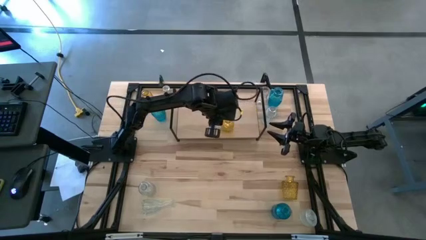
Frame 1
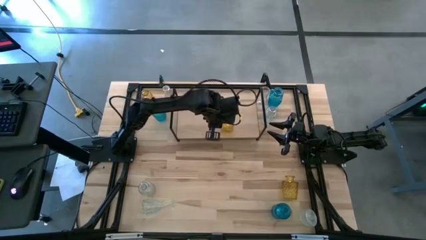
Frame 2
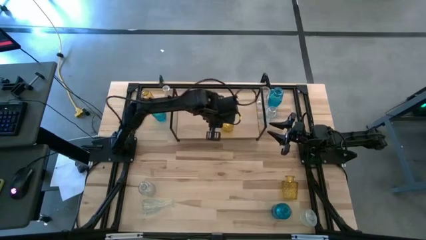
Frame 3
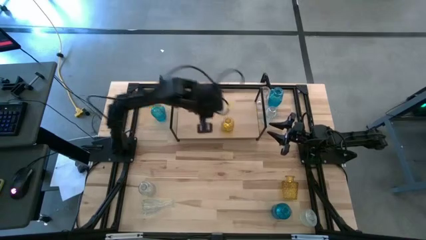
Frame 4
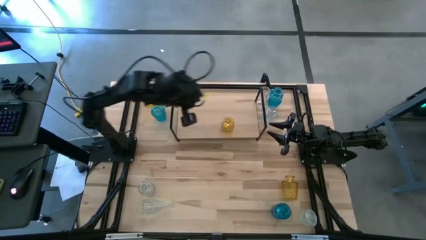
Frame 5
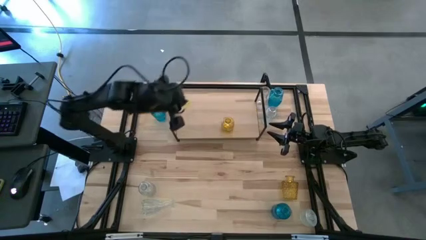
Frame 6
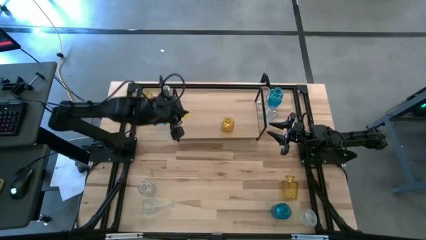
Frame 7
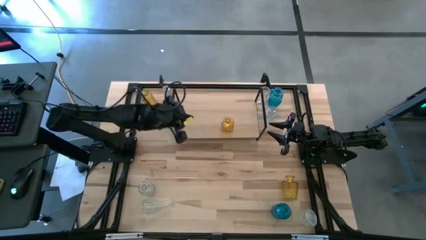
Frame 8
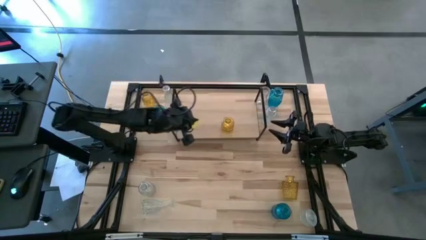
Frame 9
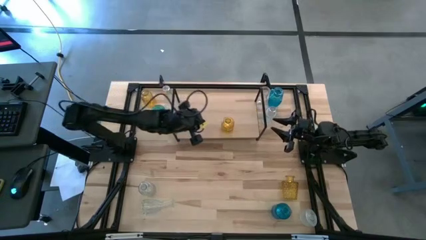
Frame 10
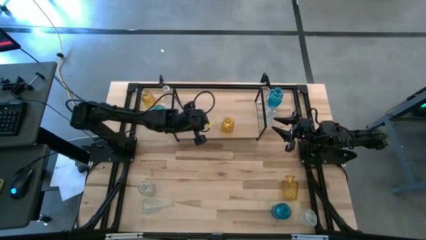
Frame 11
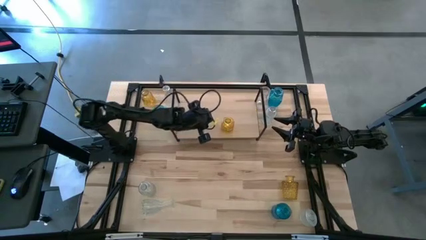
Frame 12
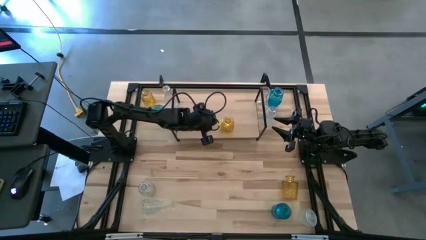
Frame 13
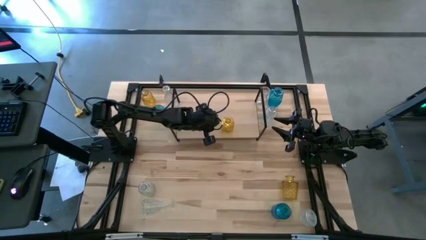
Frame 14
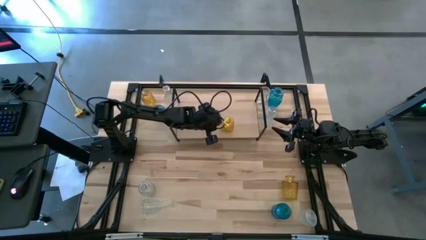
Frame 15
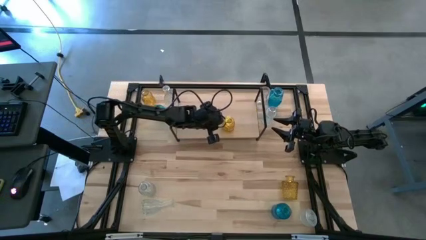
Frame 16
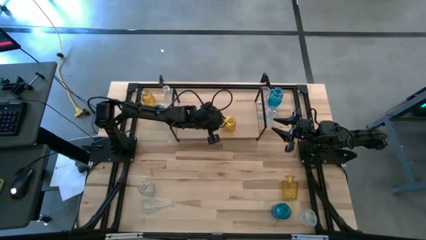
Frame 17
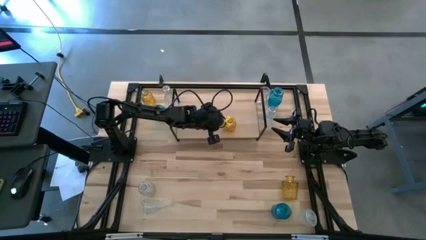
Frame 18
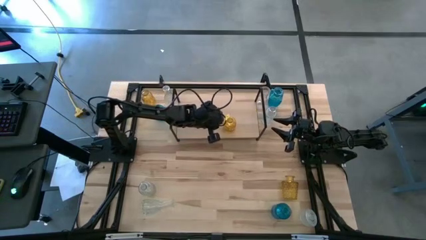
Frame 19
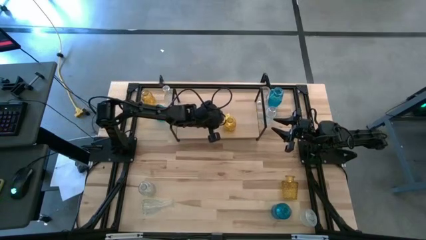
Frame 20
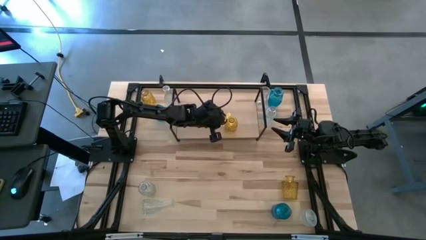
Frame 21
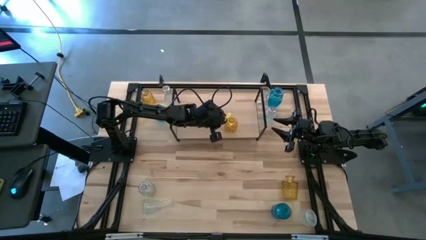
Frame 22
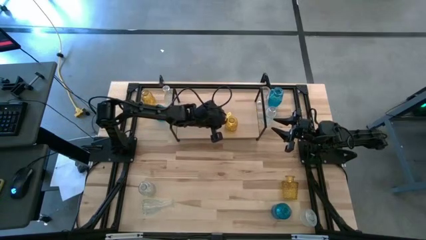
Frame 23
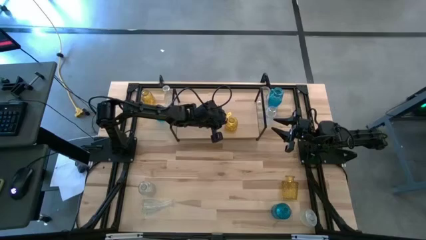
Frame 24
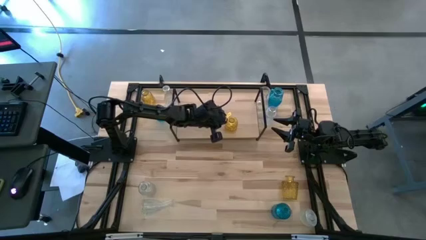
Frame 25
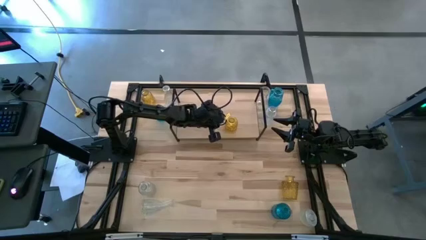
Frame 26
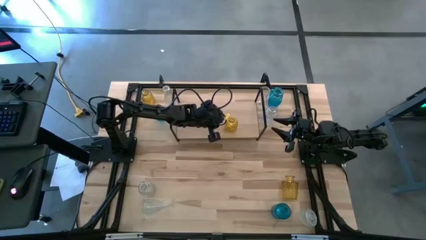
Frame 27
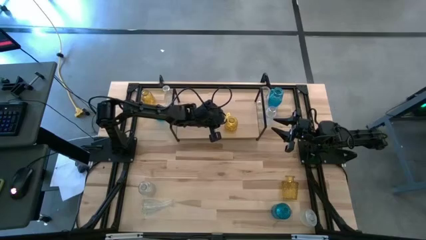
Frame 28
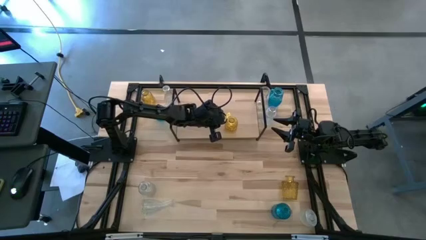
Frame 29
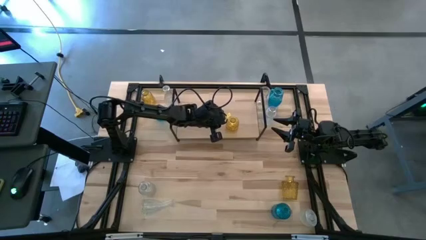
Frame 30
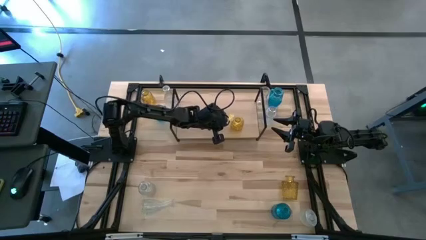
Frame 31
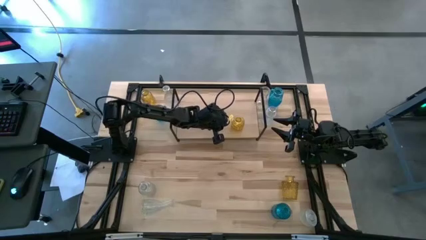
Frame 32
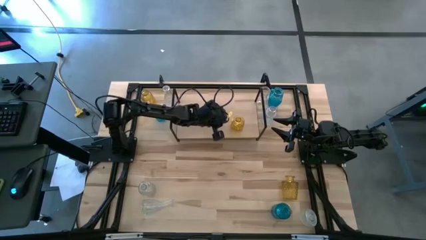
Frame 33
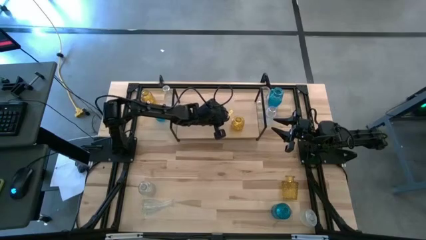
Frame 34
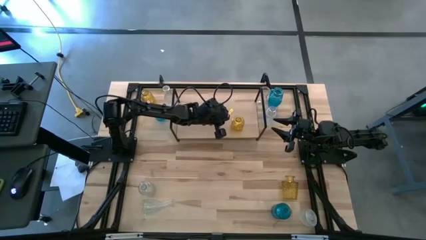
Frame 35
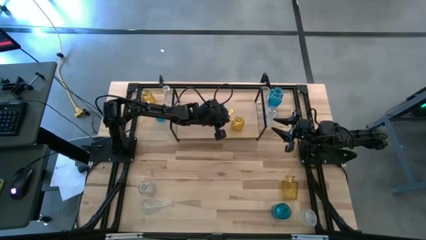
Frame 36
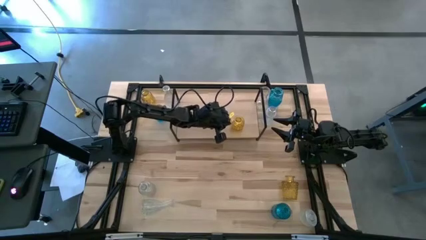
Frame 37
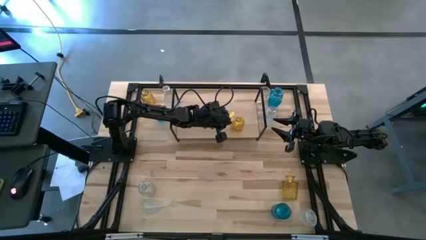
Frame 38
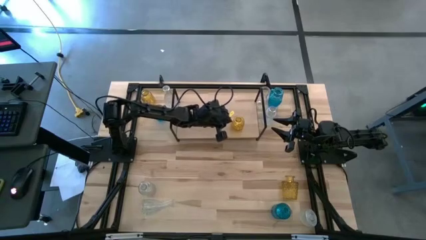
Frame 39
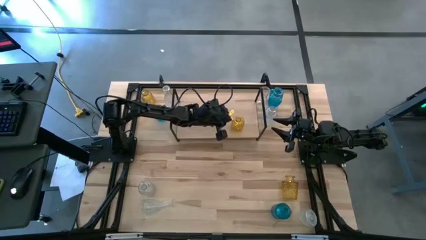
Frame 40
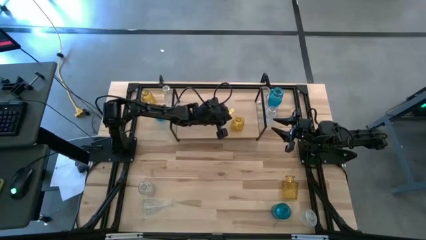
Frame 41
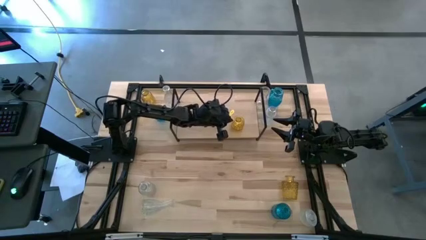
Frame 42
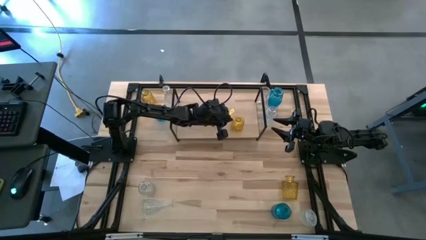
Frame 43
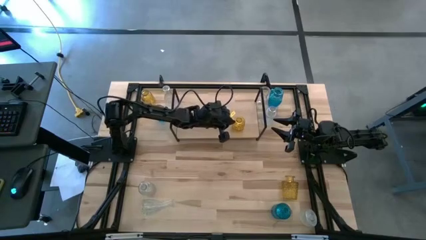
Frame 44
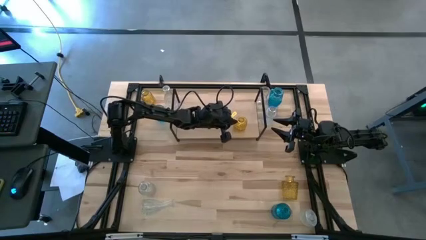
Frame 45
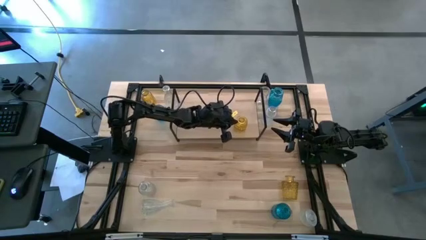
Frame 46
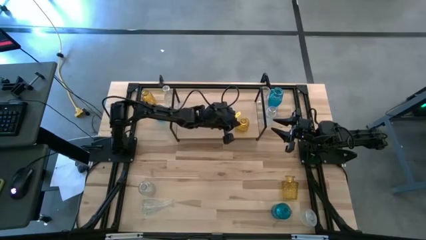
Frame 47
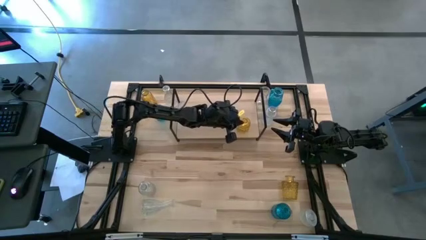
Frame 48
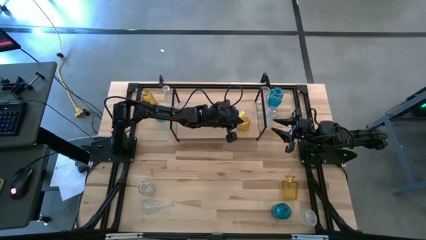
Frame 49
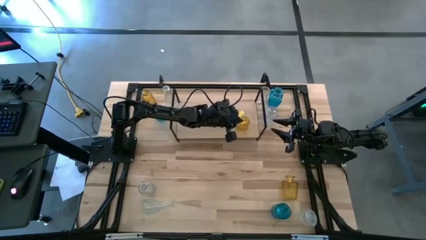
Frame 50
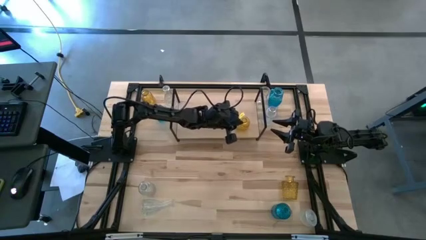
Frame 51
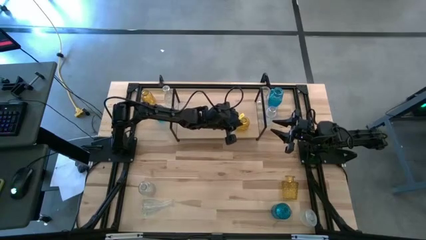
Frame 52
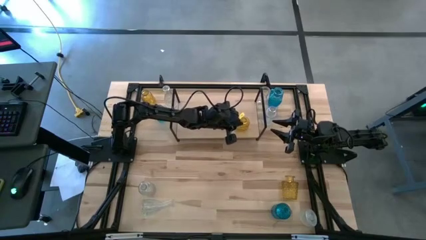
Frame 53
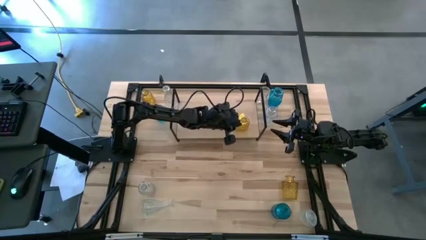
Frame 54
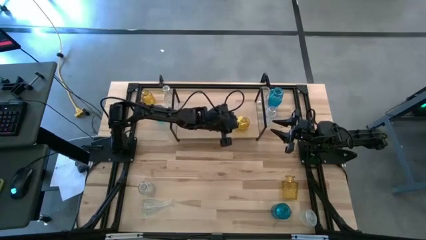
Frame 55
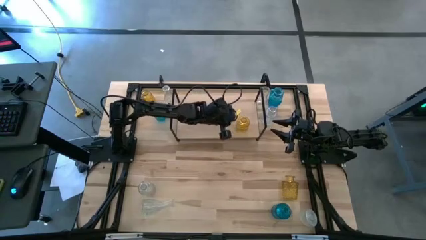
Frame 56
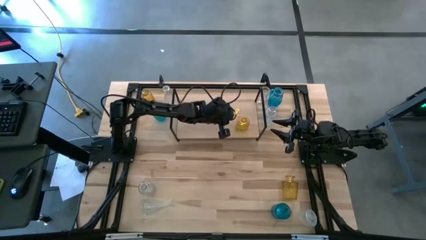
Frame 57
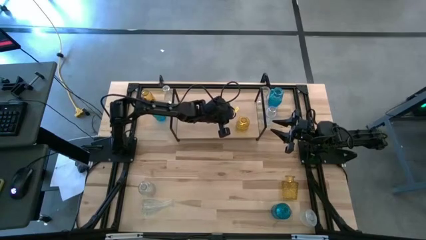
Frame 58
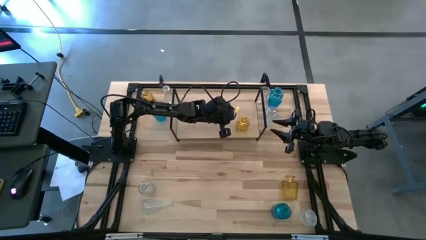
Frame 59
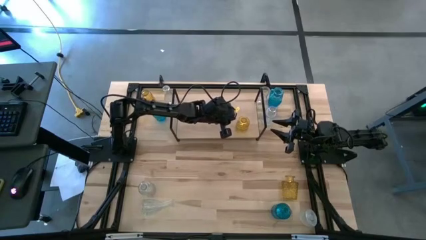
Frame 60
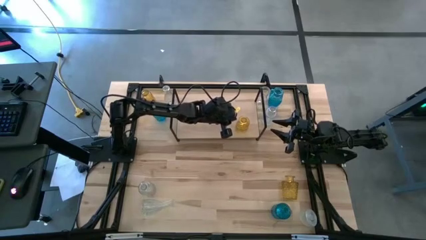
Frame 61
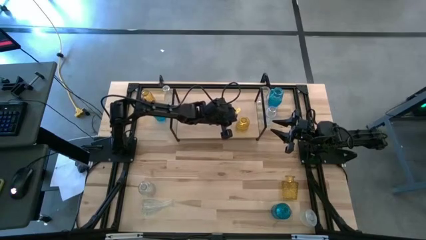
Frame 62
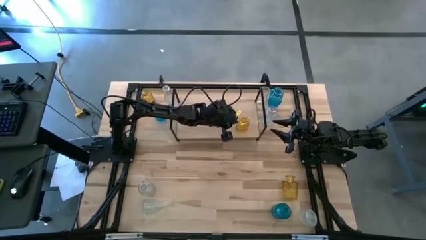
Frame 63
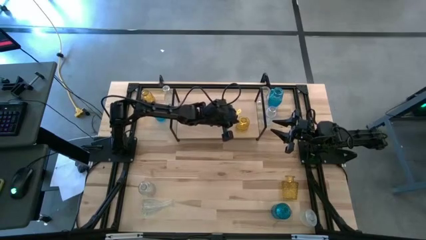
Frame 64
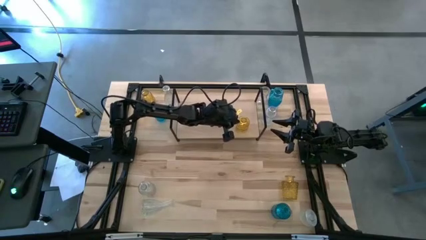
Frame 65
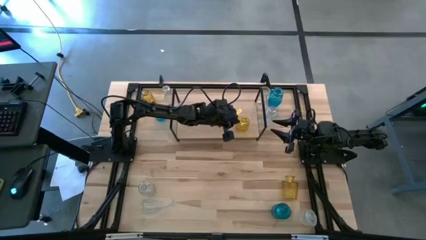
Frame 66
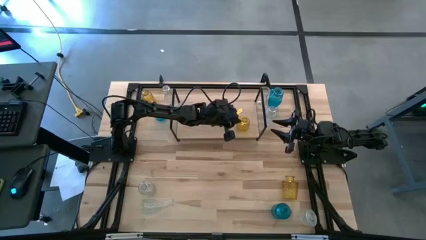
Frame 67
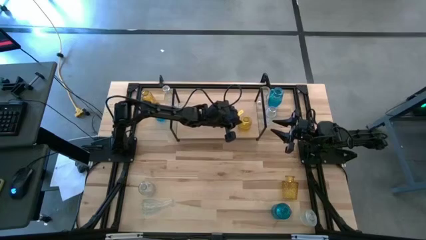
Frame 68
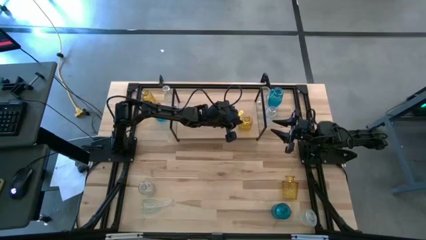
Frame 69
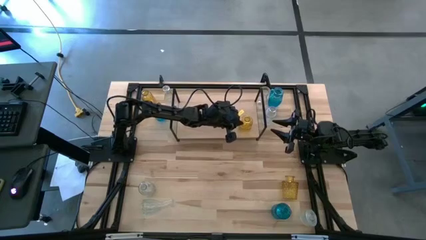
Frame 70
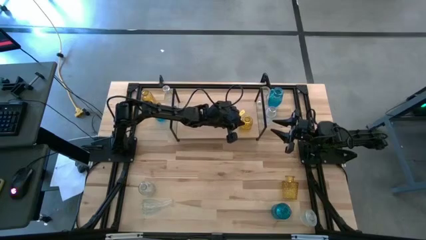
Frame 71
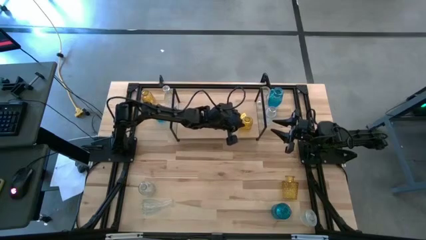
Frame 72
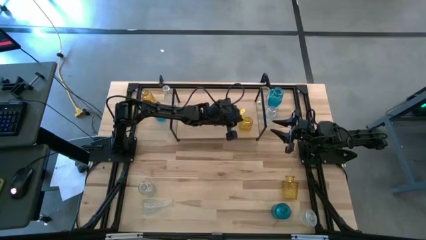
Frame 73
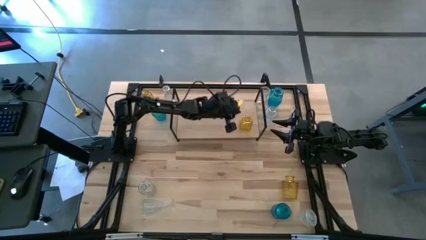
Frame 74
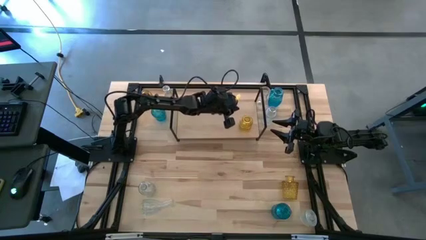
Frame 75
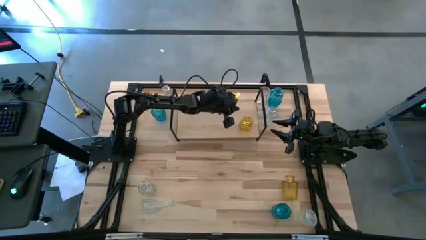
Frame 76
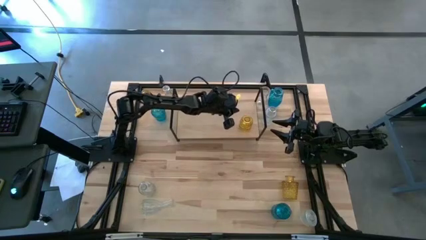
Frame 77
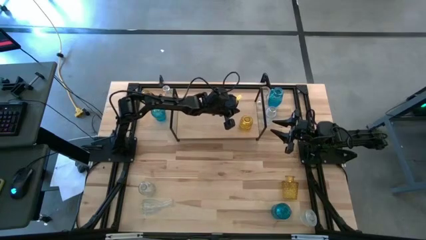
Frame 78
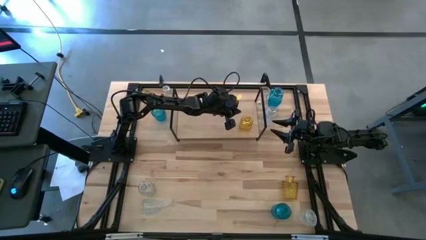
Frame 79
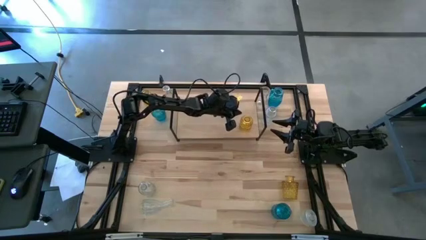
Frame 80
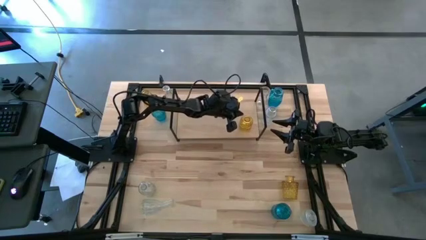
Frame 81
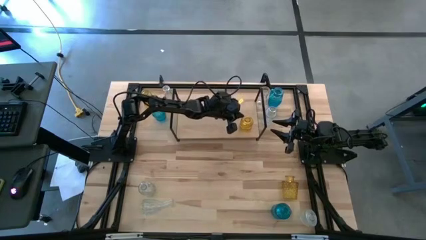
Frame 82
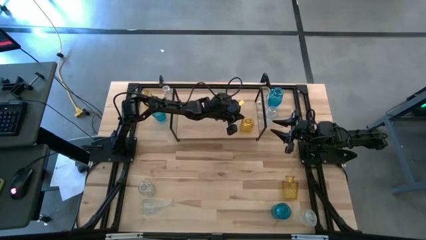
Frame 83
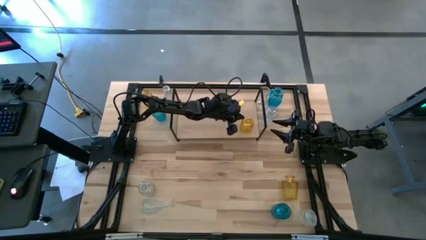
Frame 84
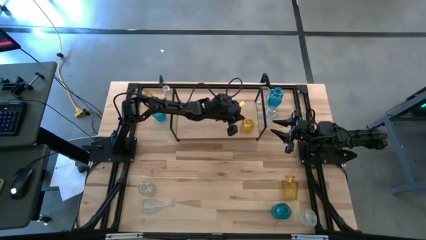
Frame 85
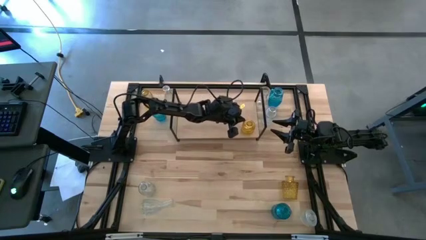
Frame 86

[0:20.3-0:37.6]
Task: sort vases onto shelf
Put the yellow vase on the shelf
